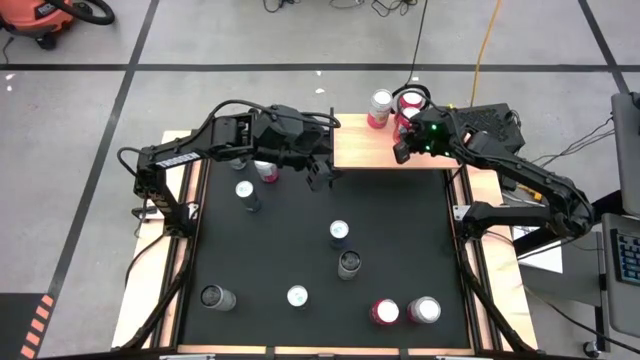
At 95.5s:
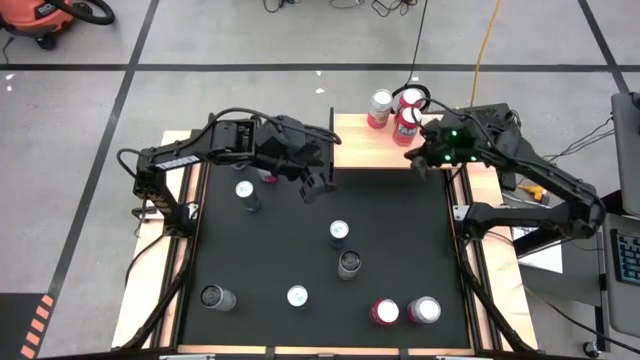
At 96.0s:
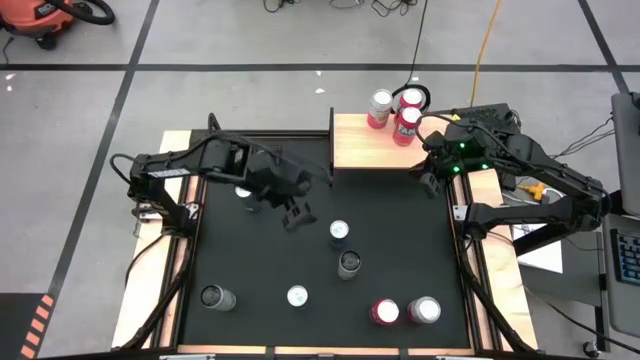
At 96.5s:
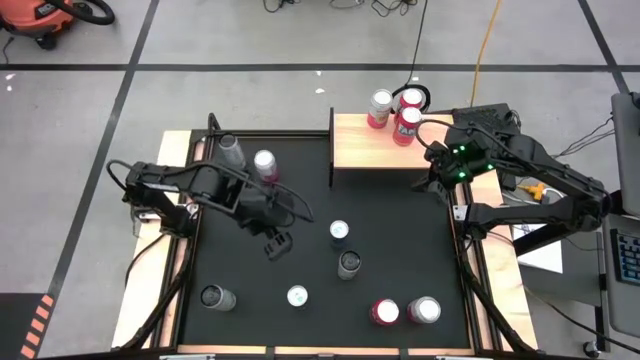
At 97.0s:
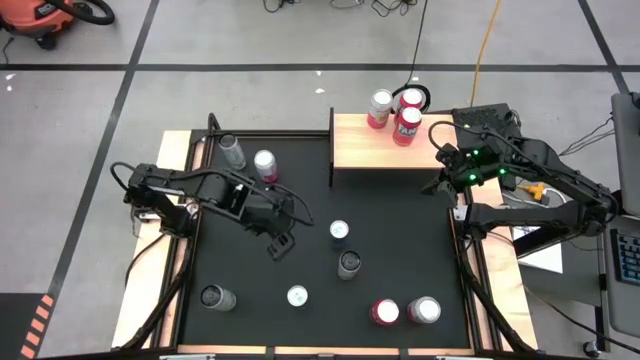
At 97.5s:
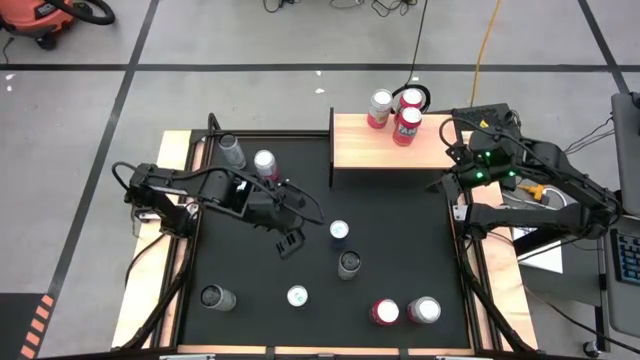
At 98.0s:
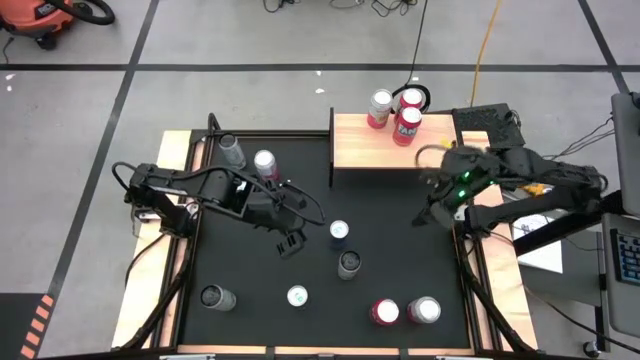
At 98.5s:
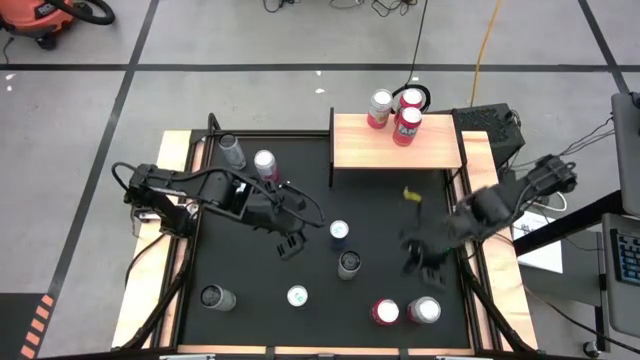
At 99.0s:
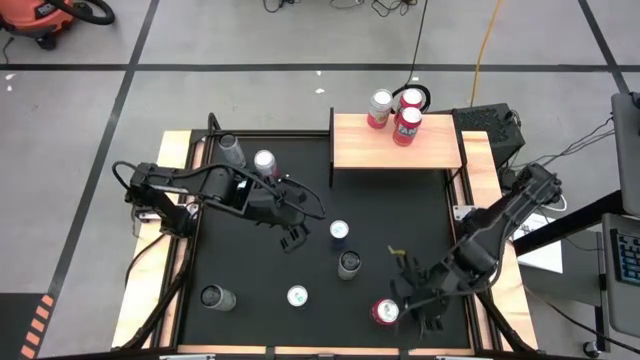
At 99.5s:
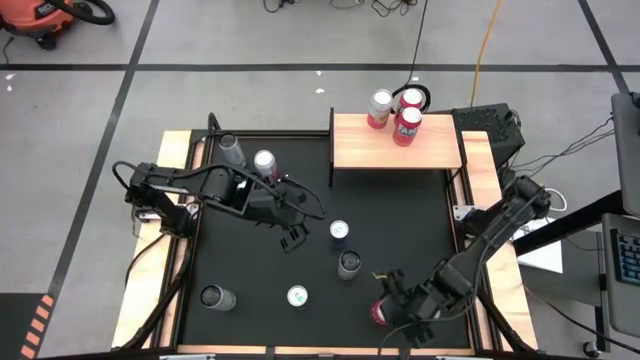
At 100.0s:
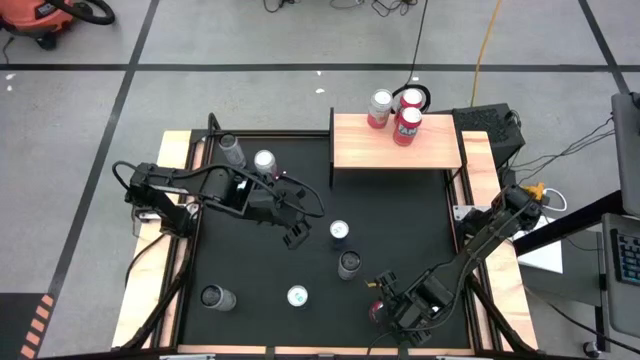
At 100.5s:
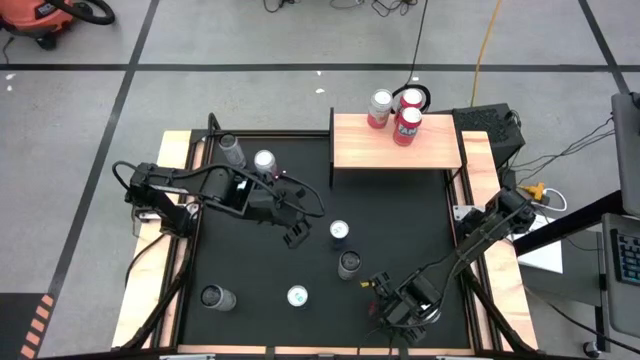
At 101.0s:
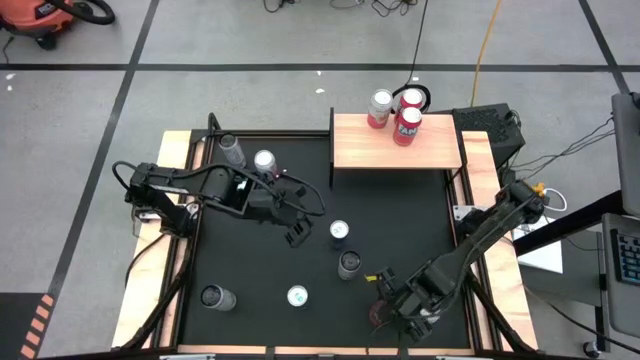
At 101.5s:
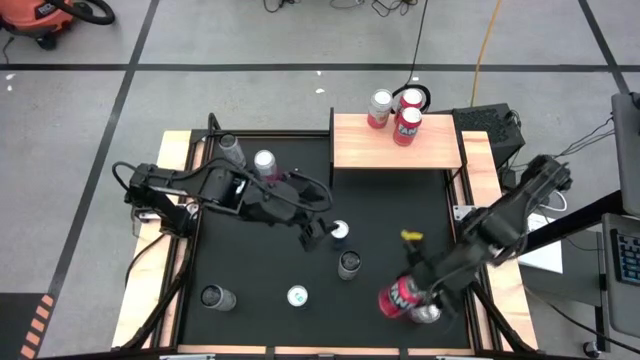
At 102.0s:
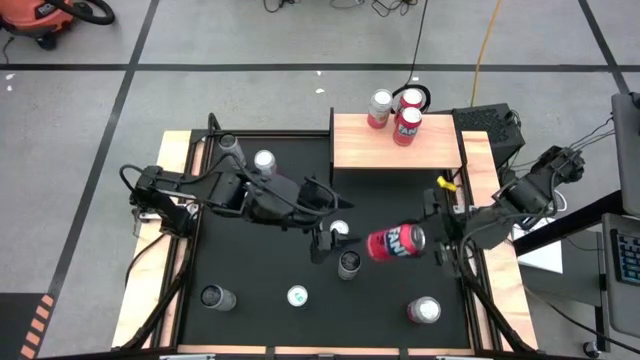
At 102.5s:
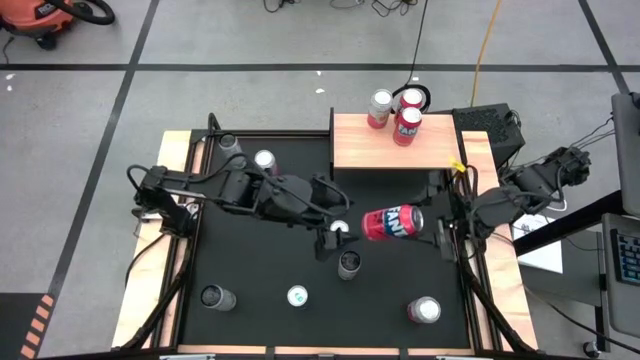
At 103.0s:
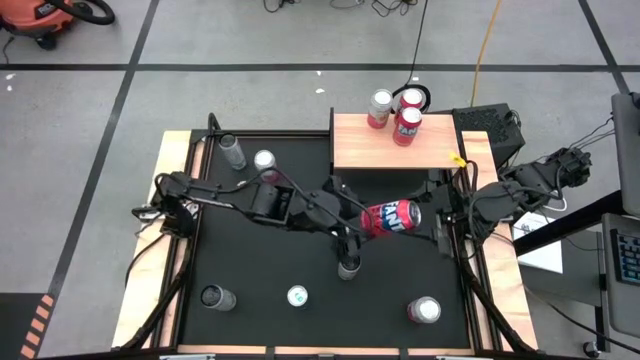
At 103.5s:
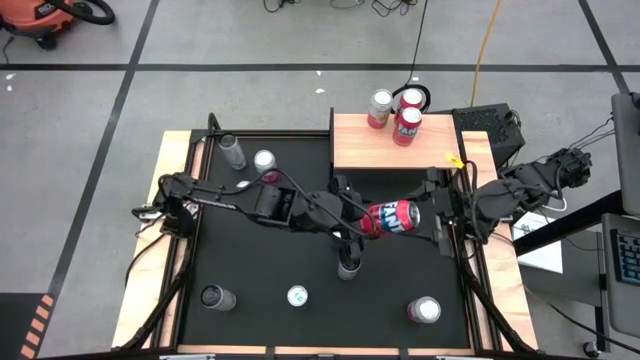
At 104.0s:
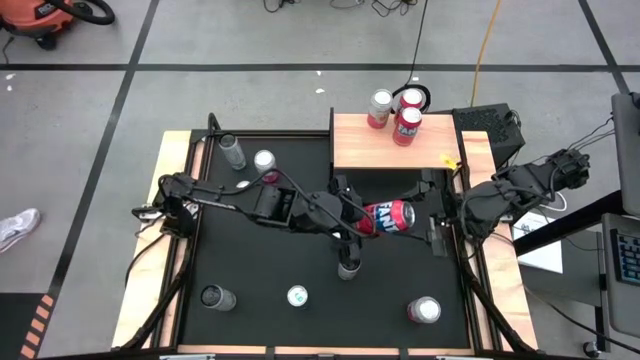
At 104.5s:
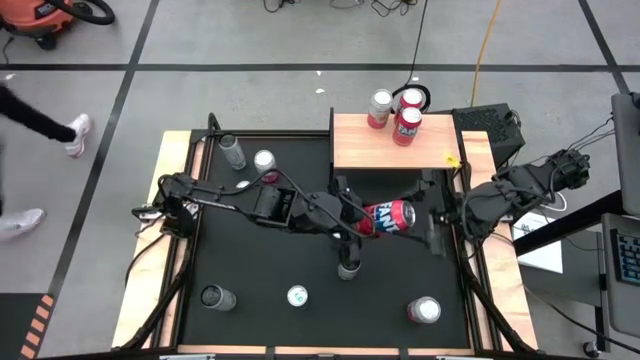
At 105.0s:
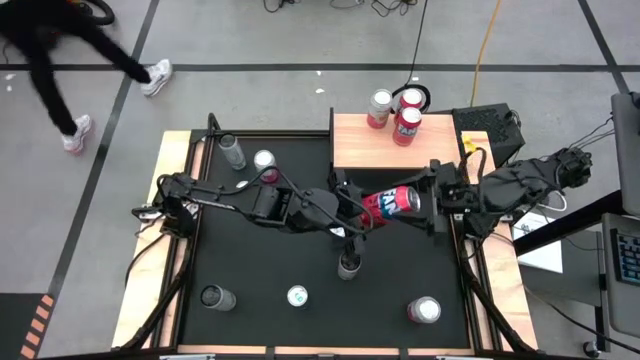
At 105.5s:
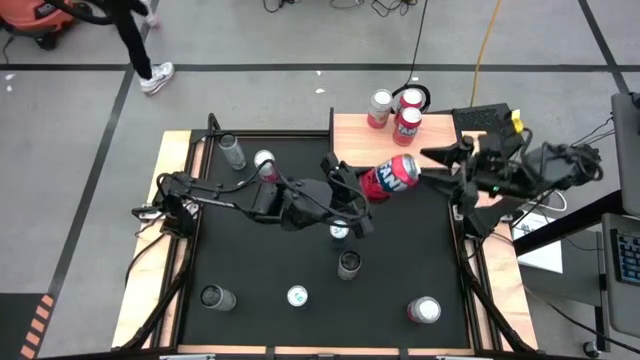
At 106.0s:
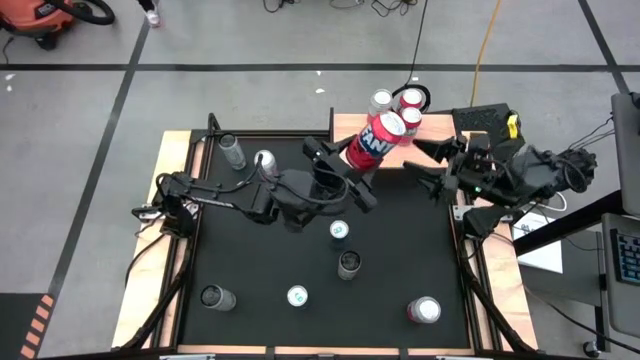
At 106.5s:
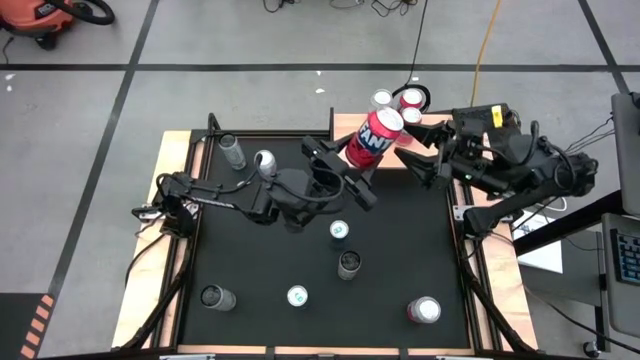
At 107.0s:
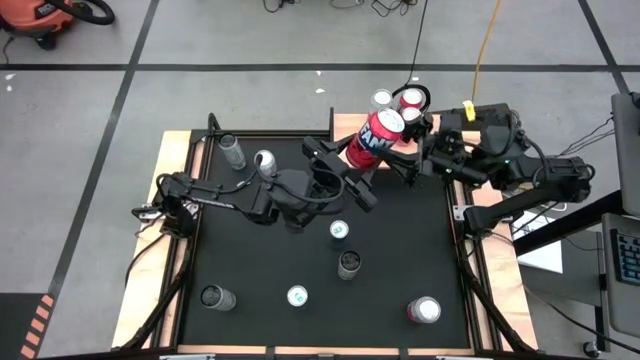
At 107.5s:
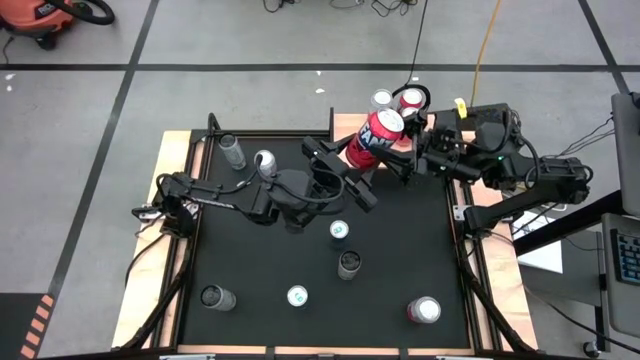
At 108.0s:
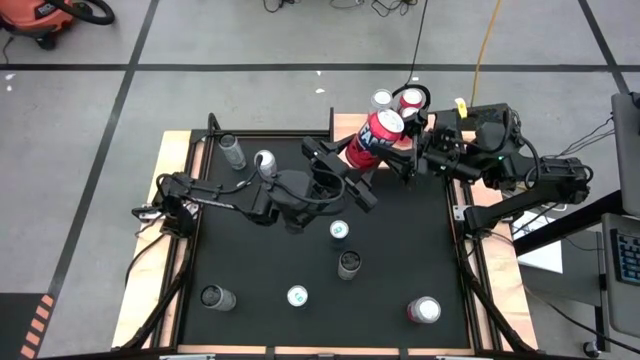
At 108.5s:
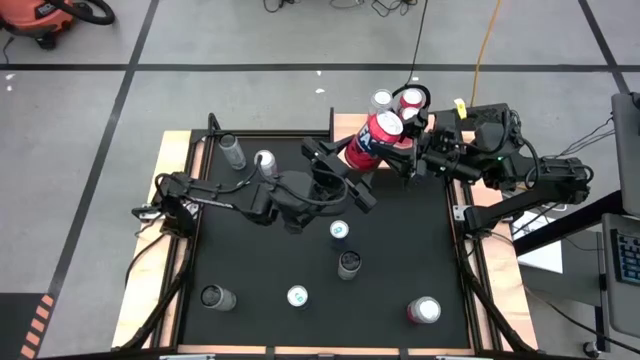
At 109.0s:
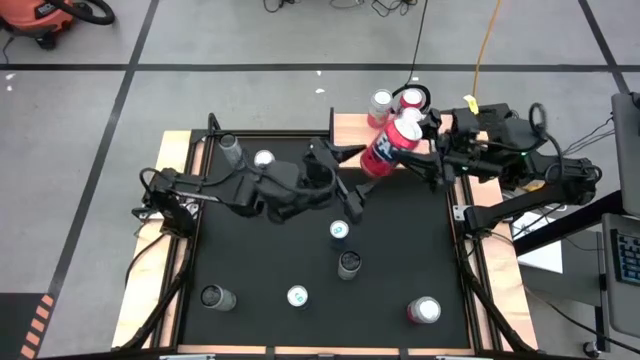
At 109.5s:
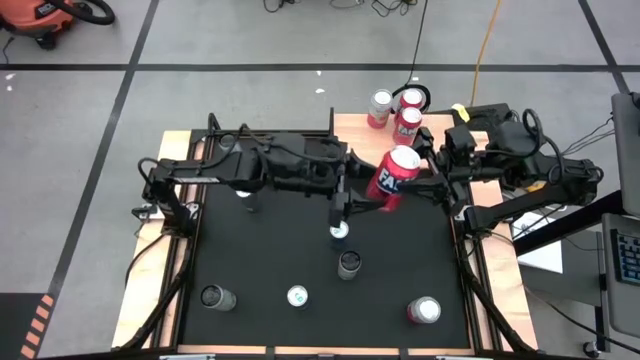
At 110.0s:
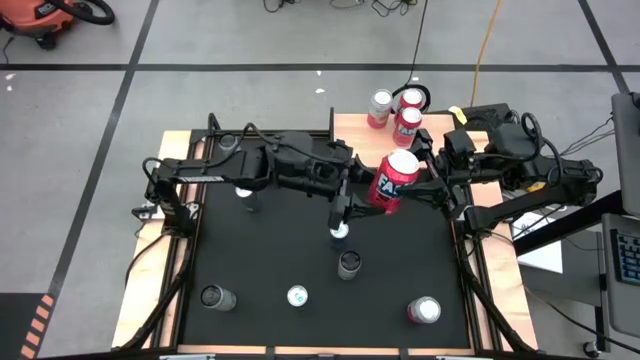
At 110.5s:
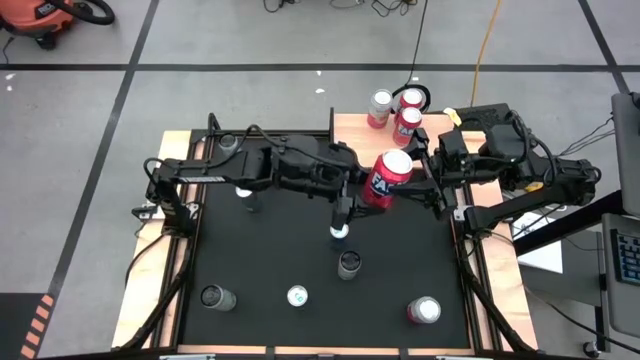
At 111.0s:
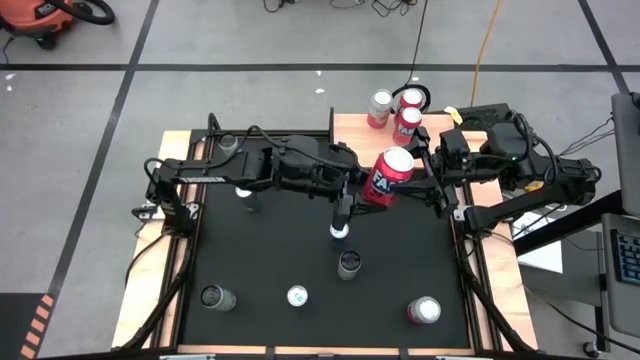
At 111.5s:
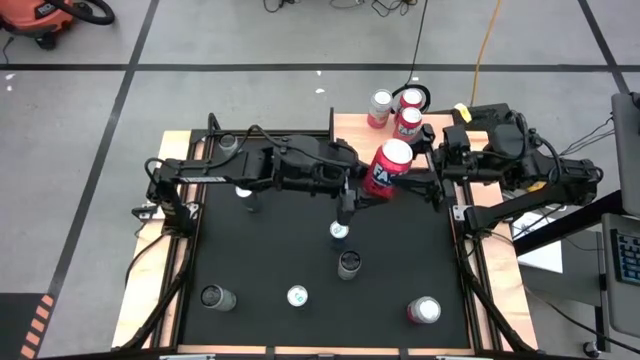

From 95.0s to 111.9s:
Task: Place canned beverage on shelf
Put the red soda can on the shelf aligned with the other red soda cans

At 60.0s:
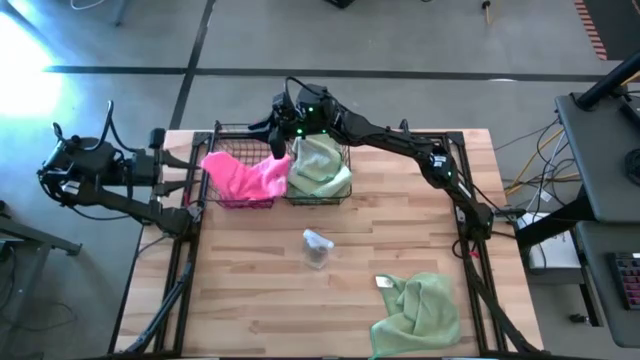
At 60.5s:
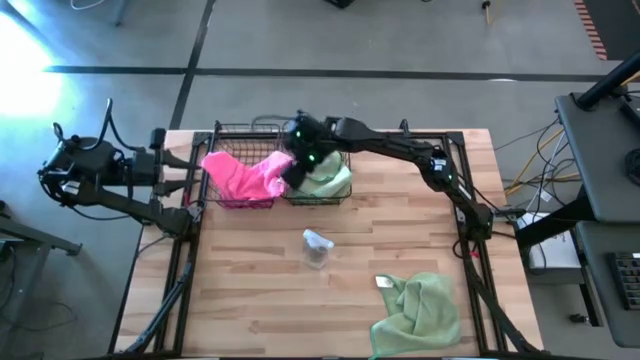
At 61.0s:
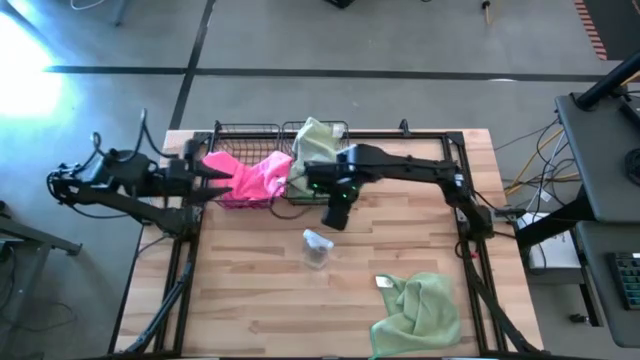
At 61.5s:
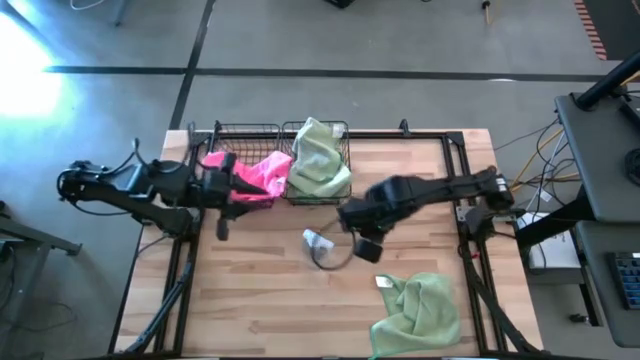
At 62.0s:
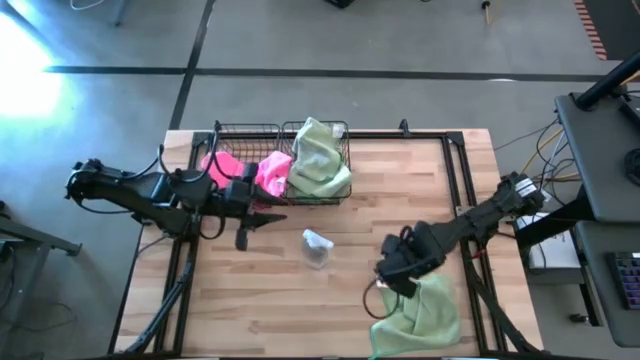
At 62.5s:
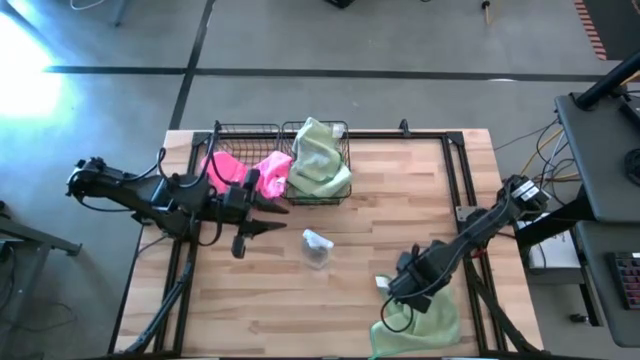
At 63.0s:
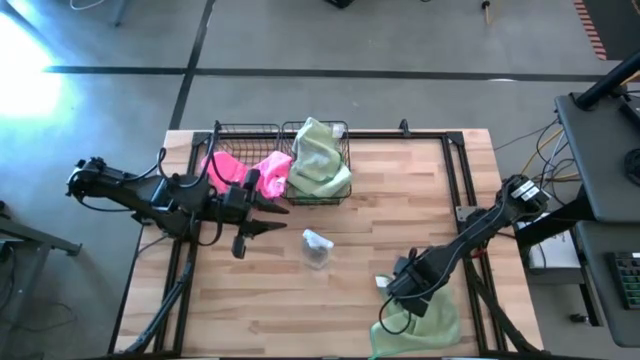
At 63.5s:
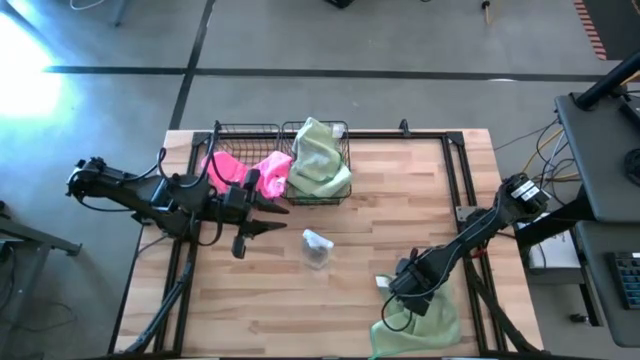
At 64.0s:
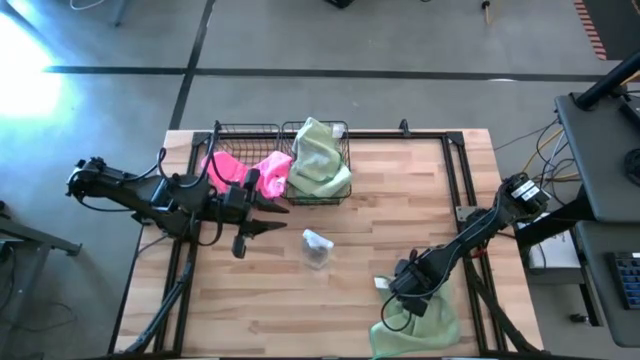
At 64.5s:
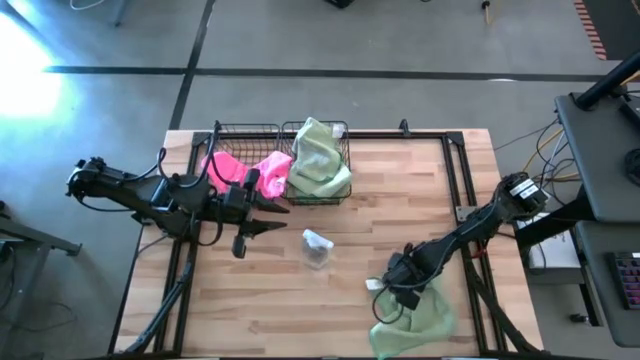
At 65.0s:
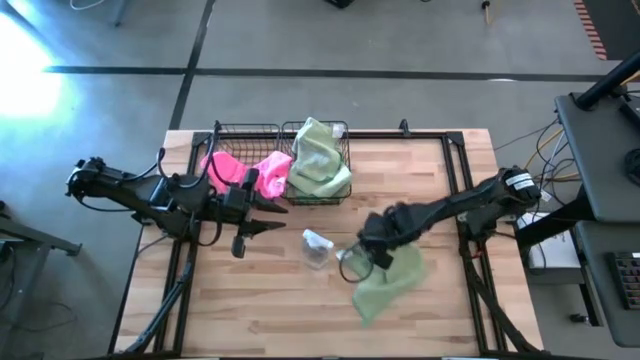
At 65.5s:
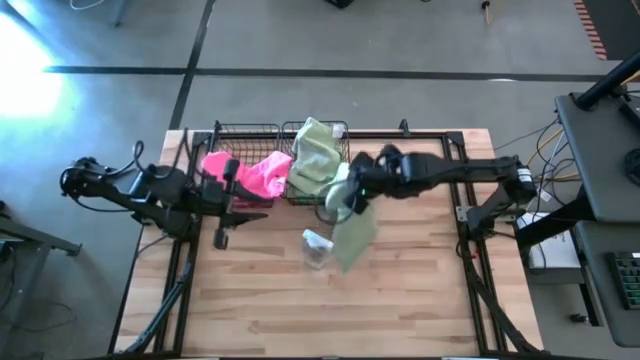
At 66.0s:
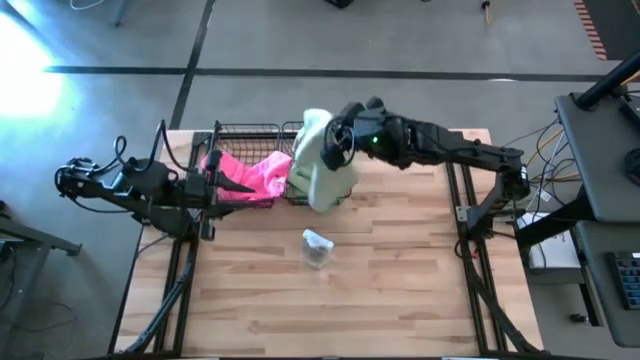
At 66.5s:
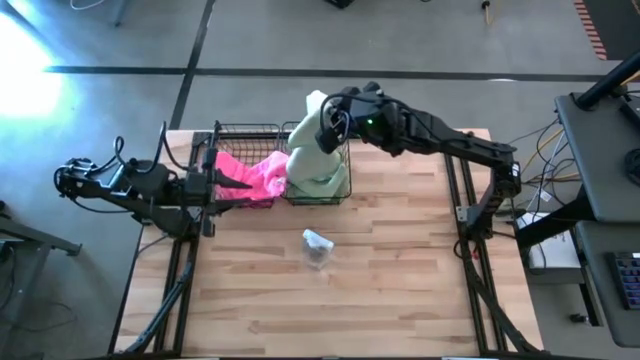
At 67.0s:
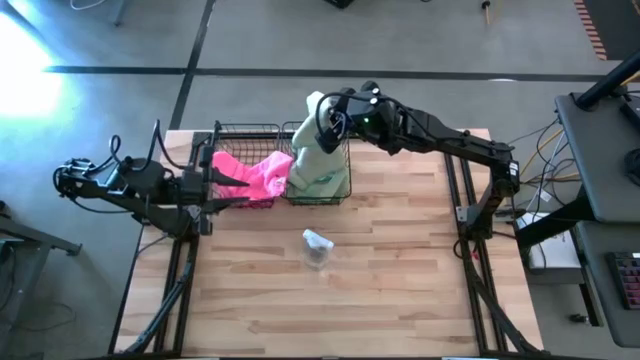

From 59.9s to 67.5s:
Task: Sort microfiber towel by color & place in baskets
Put the green microfiber towel into the right black wire basket
